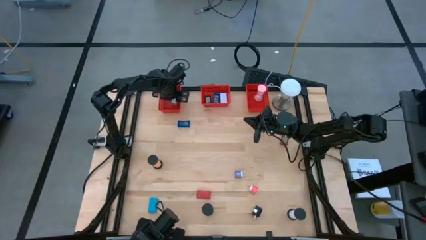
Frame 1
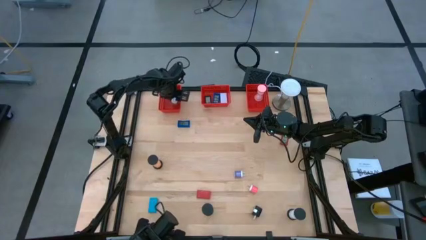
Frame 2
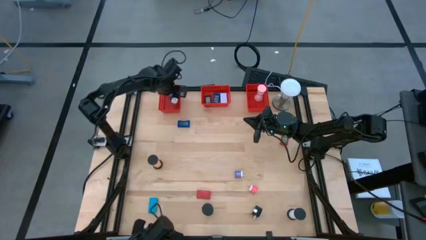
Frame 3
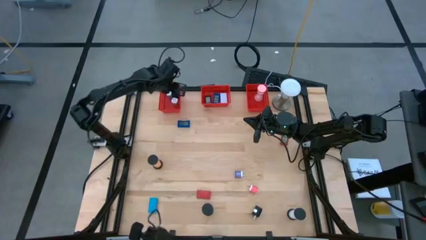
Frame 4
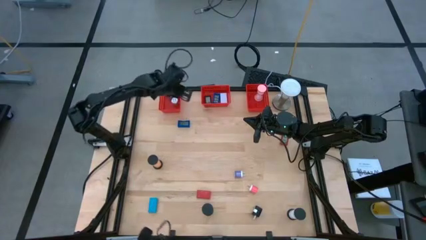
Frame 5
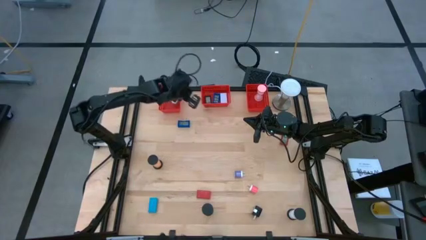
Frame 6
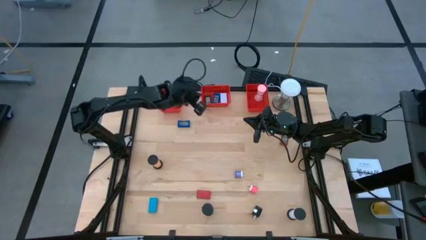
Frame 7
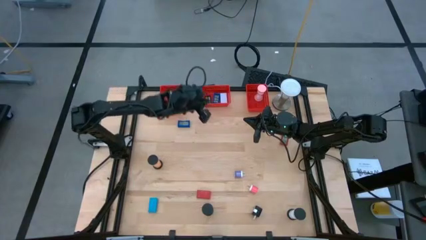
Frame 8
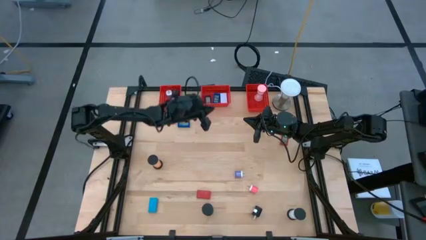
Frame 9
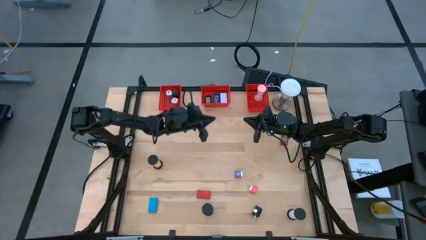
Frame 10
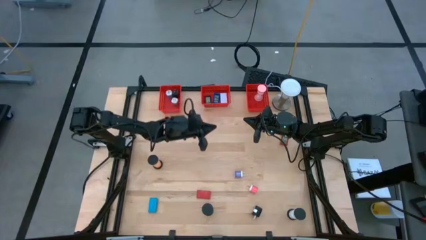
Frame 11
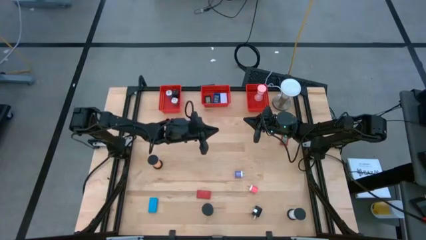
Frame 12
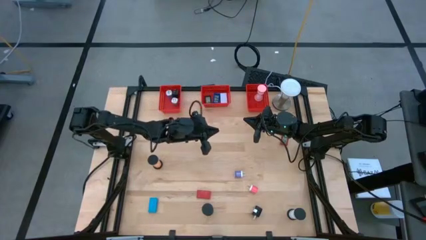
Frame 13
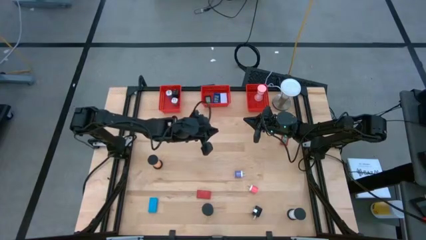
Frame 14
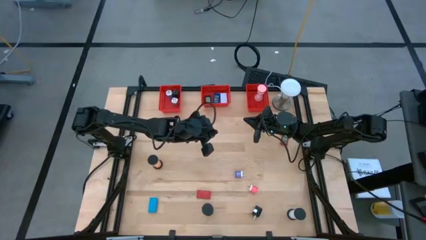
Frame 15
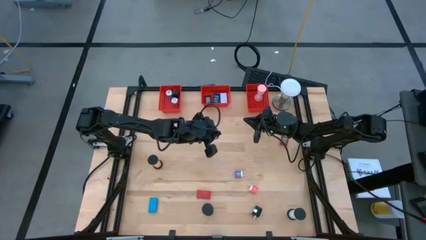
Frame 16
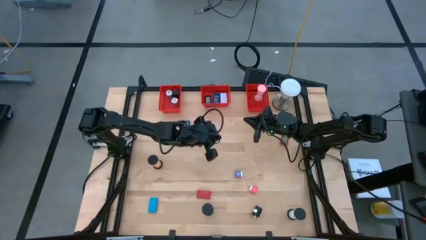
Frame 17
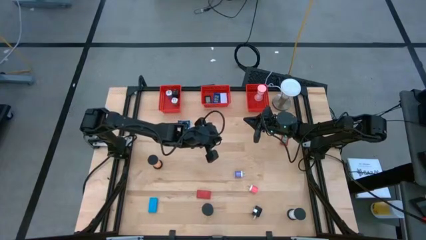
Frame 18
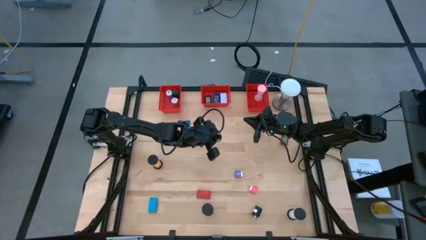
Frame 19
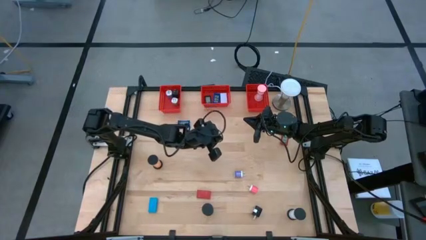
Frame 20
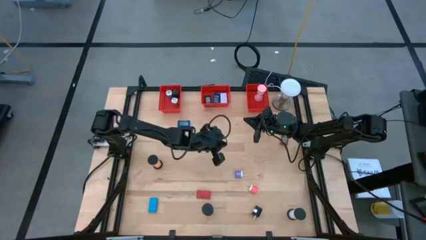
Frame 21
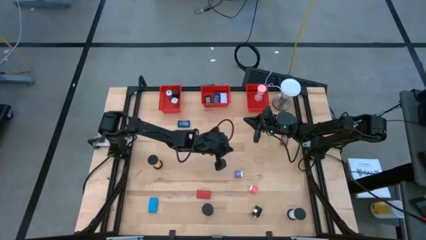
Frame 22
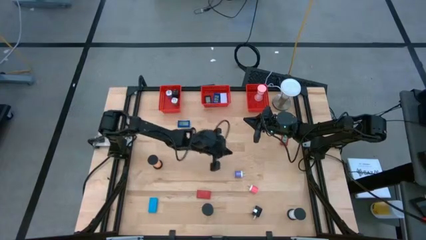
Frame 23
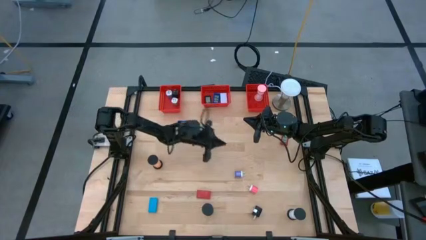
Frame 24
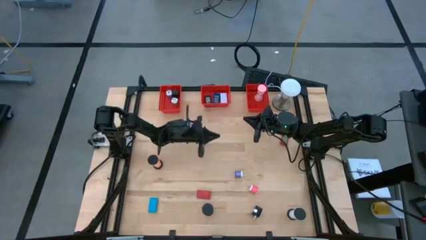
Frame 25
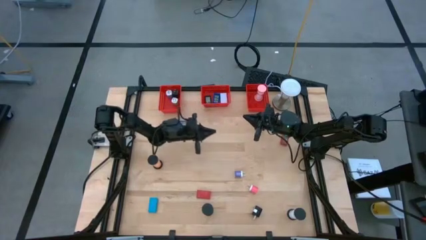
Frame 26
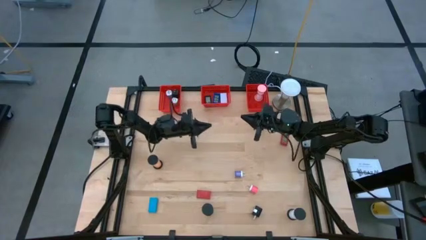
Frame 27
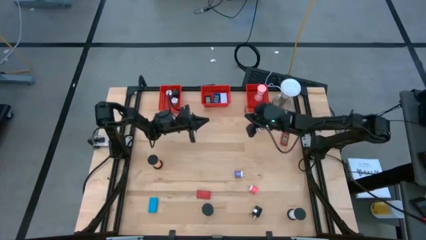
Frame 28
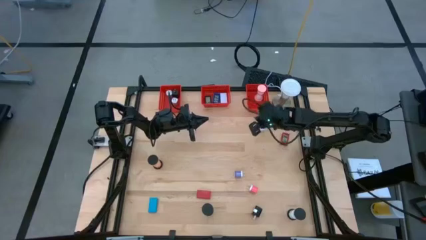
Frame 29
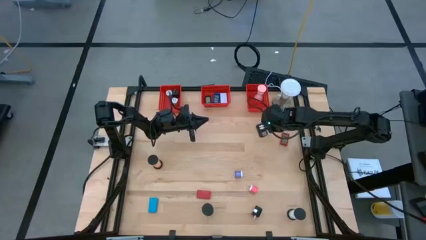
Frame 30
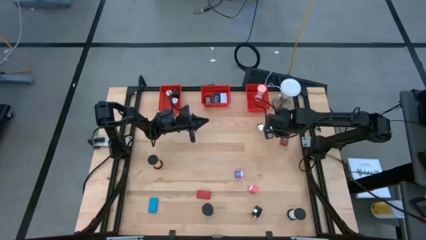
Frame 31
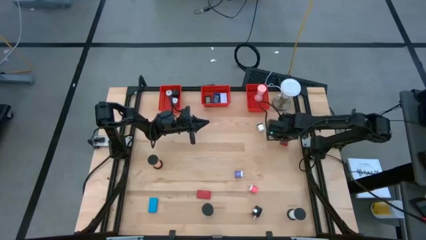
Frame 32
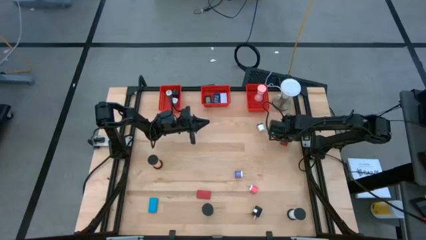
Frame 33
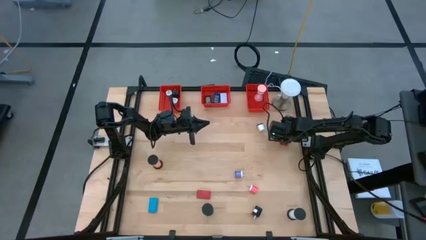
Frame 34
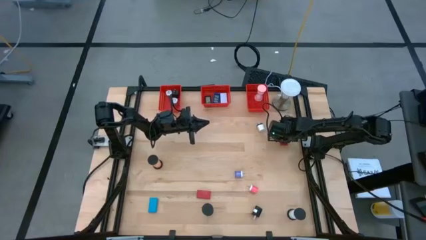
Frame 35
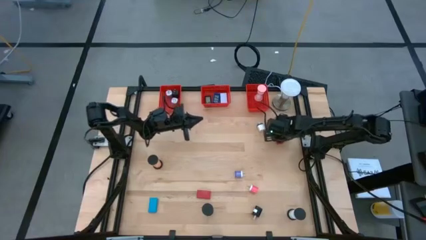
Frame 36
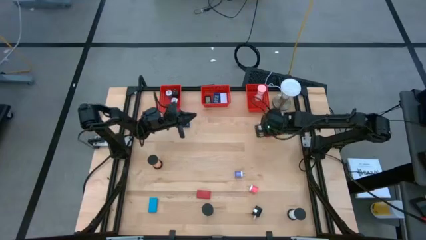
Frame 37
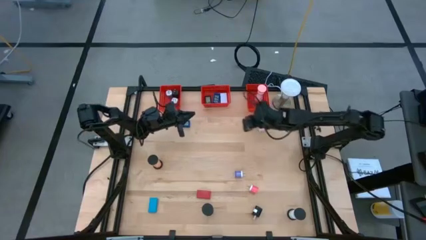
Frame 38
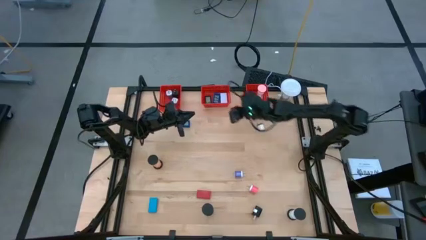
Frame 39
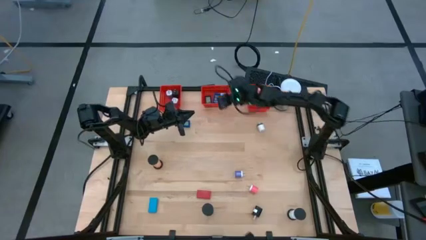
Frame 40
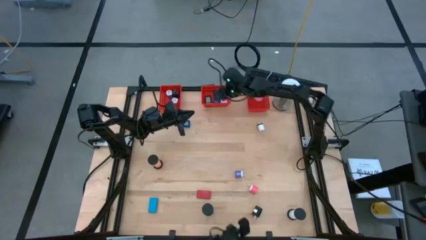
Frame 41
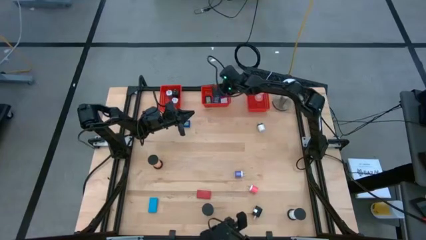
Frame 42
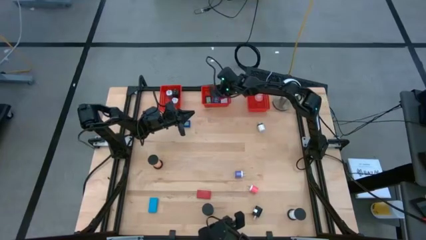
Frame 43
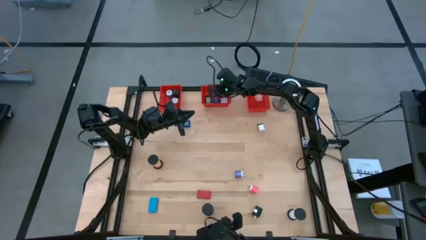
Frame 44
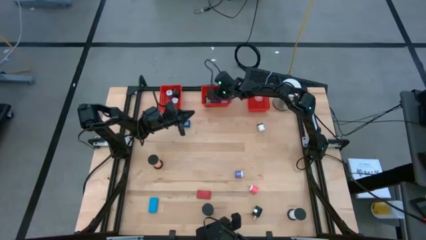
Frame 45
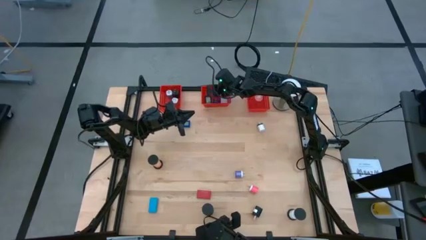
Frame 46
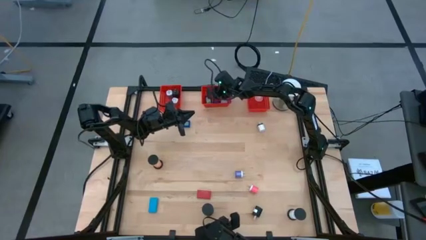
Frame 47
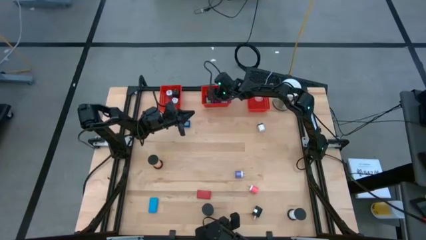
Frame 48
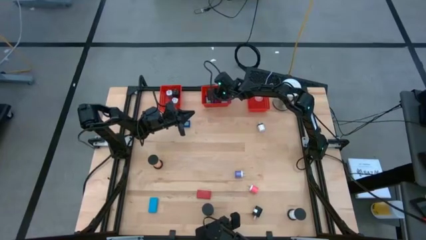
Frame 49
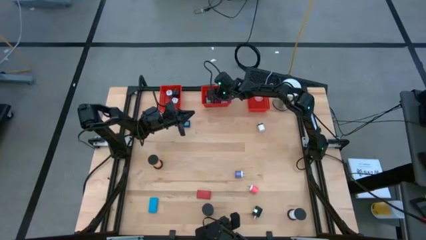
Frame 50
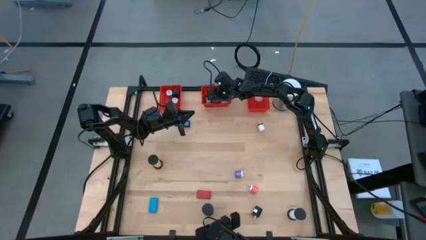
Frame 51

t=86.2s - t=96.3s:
Task: Pick & Place Office items
Put the red digital clock into the middle red bin

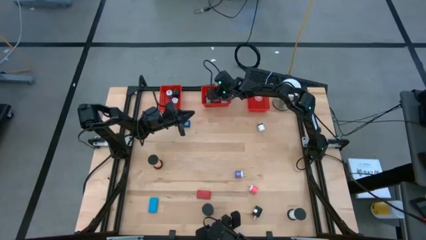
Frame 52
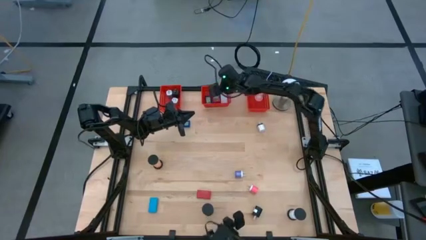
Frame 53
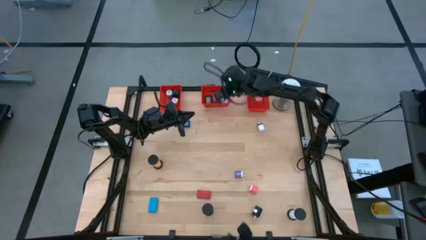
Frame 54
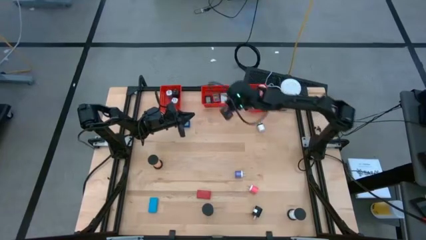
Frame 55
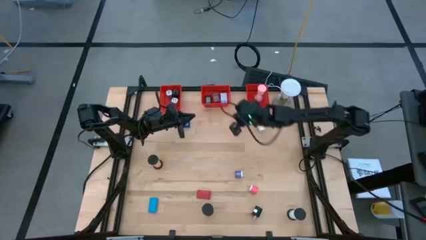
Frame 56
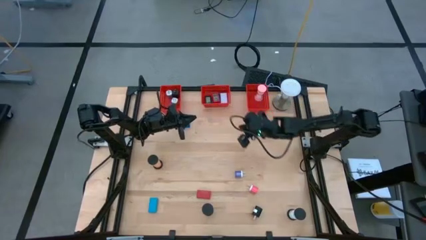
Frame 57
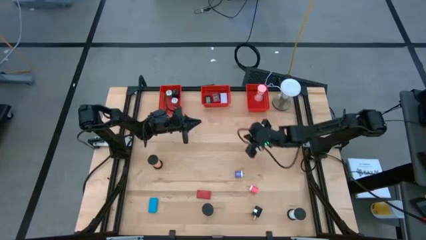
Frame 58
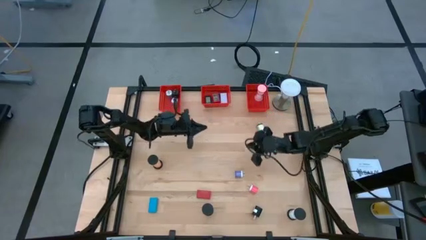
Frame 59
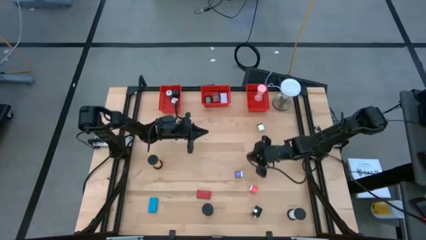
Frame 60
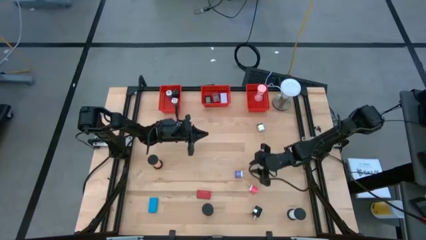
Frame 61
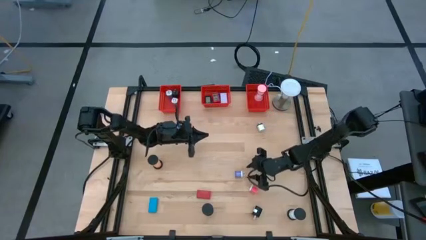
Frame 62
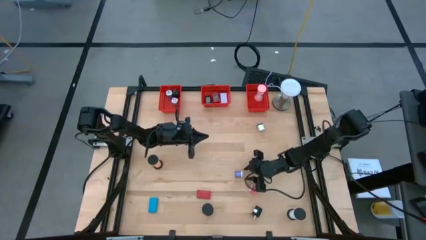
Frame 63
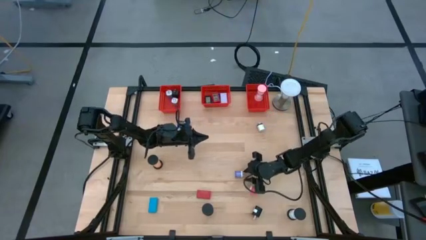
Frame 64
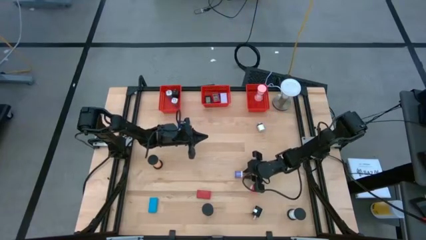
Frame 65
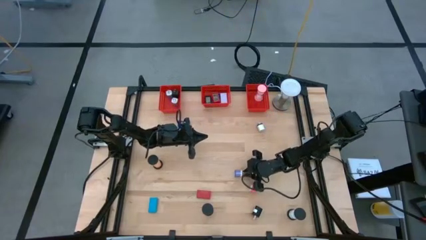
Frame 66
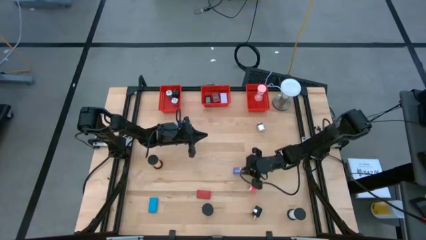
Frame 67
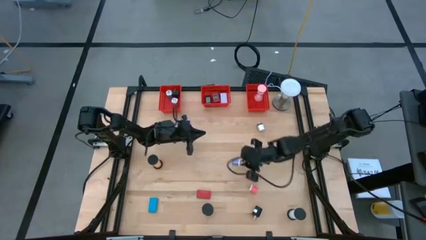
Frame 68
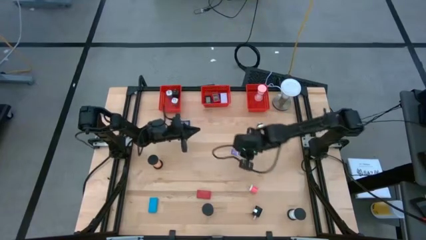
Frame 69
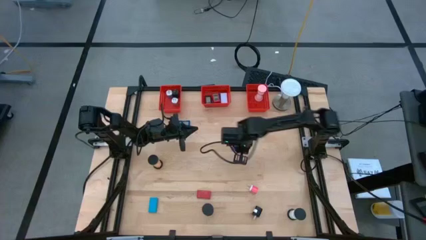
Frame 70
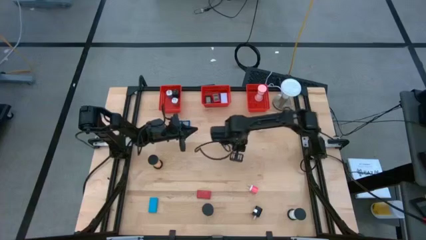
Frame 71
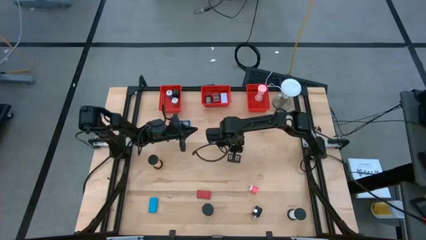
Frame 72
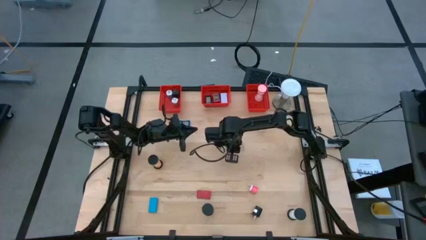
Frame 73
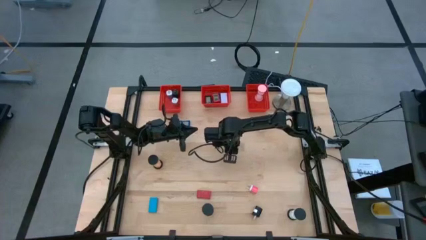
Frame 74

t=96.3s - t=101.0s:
Put the dark blue charger adapter into the left red bin
